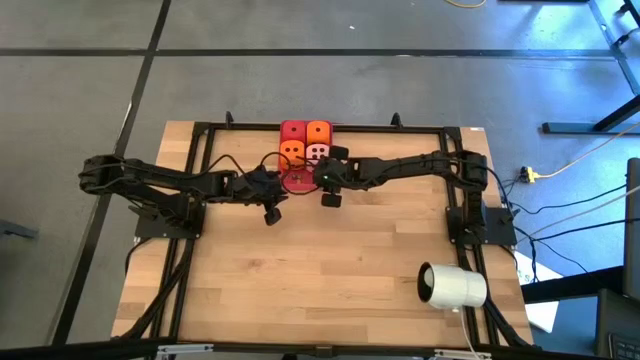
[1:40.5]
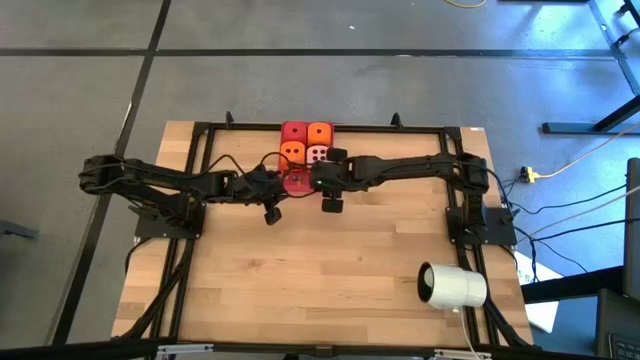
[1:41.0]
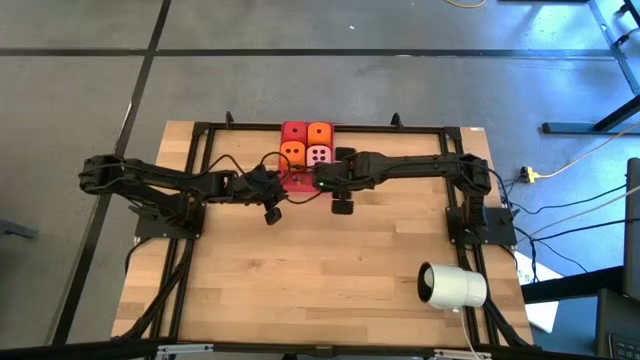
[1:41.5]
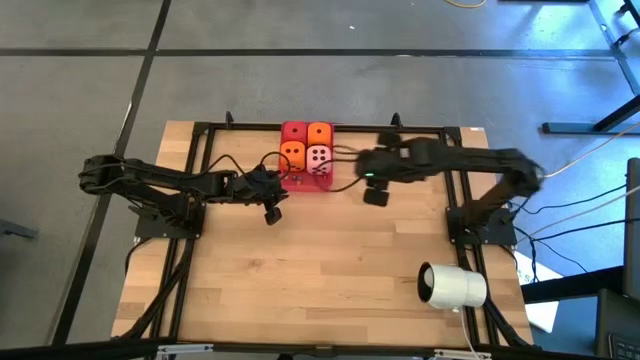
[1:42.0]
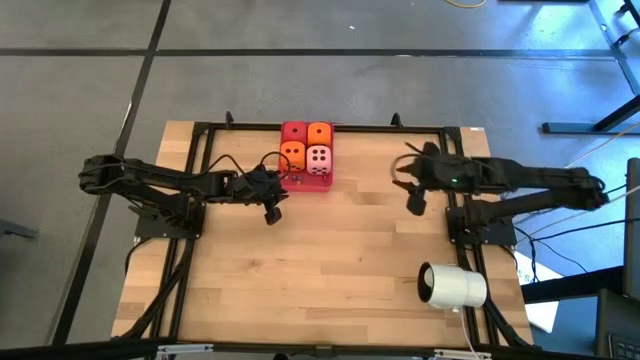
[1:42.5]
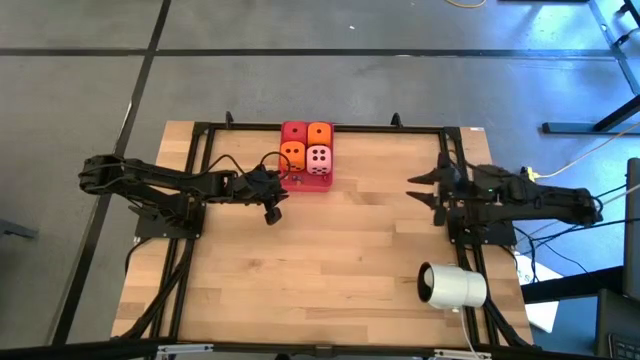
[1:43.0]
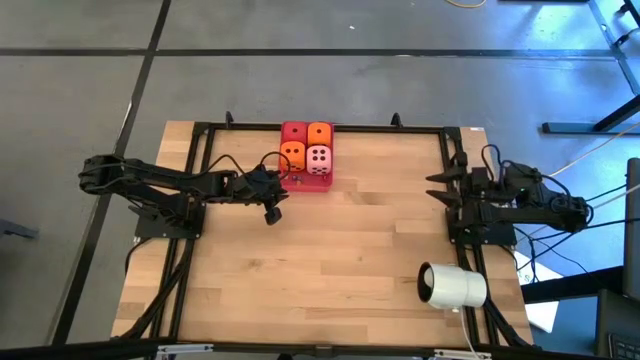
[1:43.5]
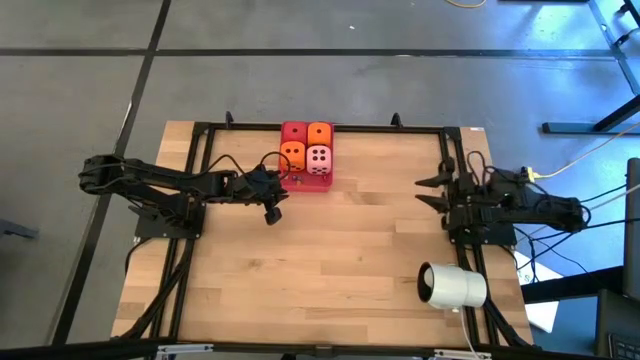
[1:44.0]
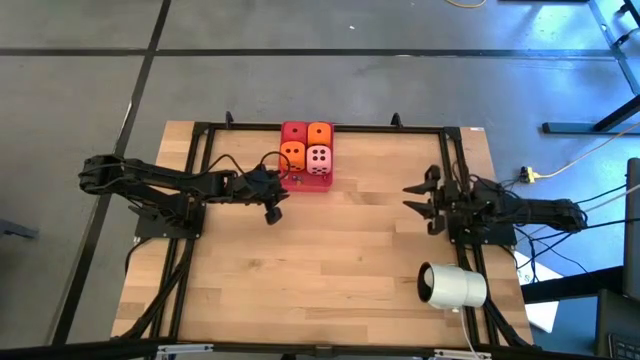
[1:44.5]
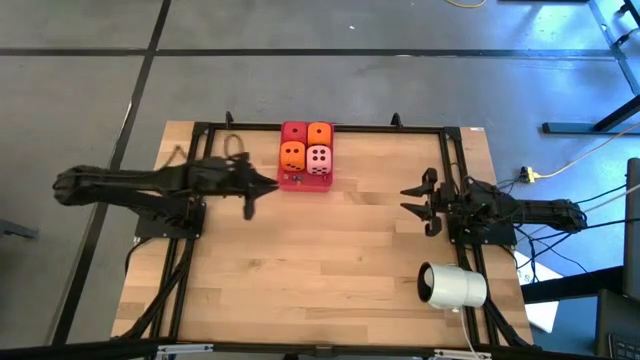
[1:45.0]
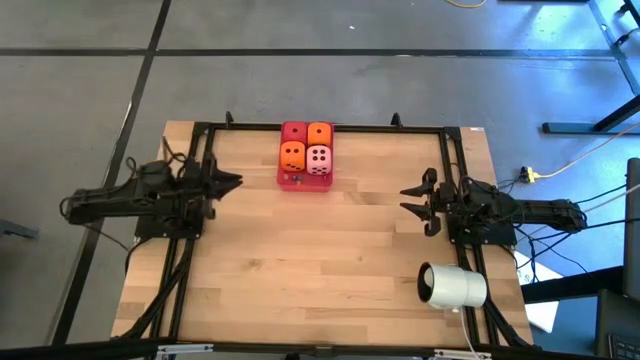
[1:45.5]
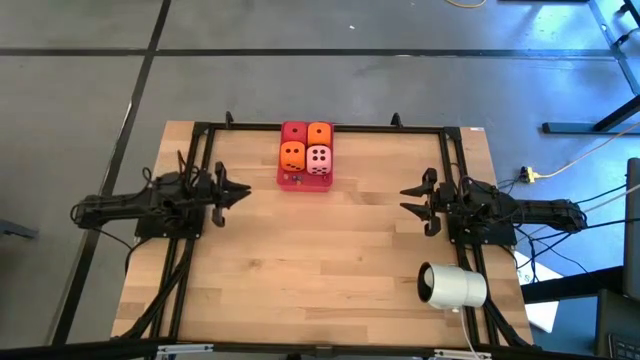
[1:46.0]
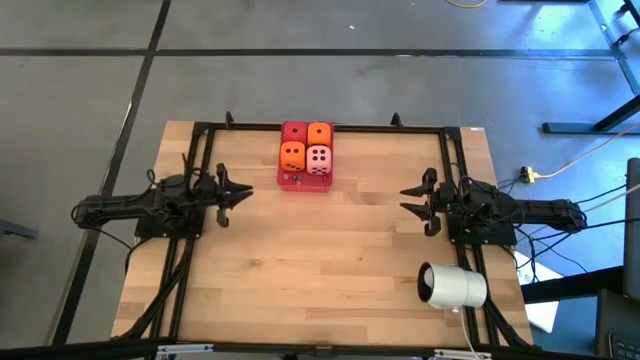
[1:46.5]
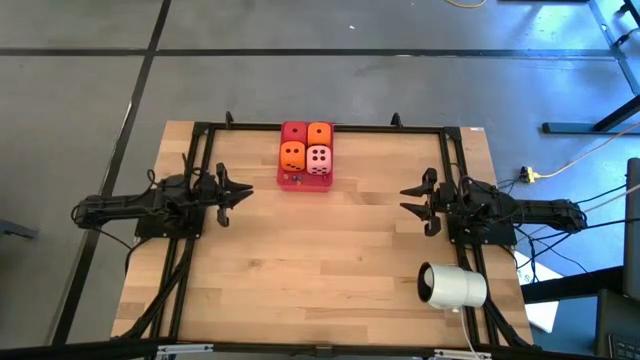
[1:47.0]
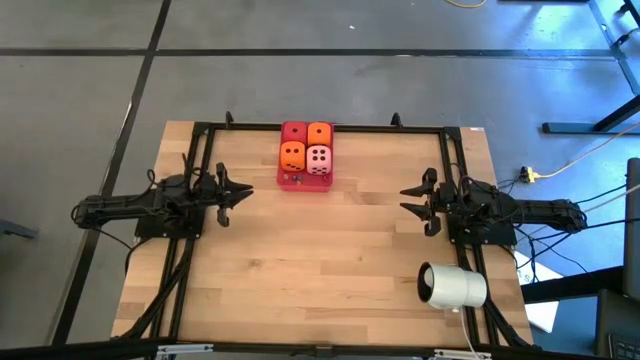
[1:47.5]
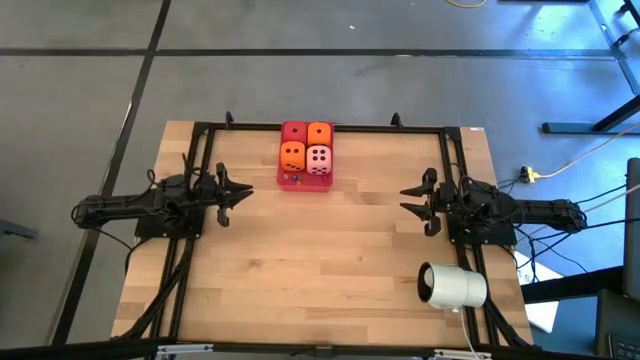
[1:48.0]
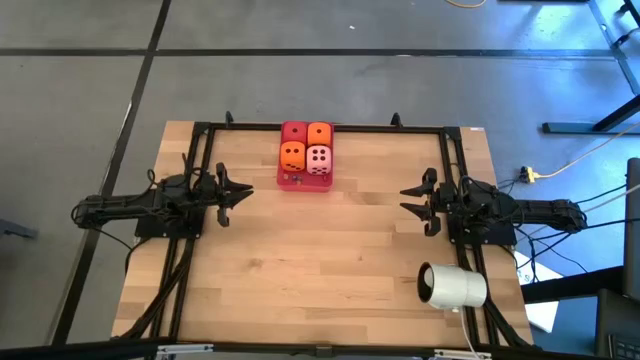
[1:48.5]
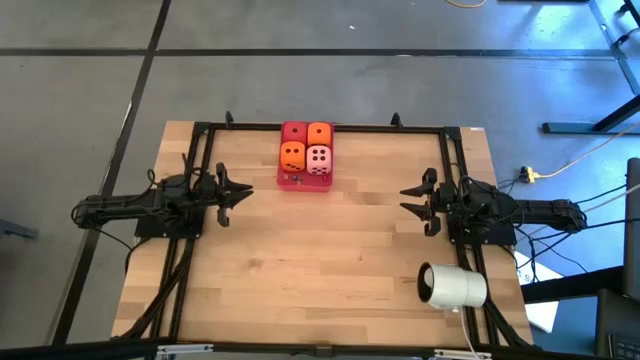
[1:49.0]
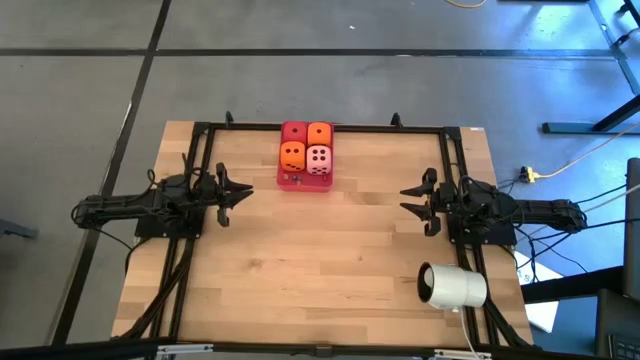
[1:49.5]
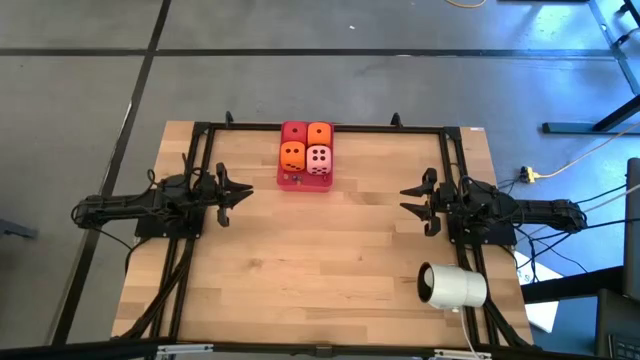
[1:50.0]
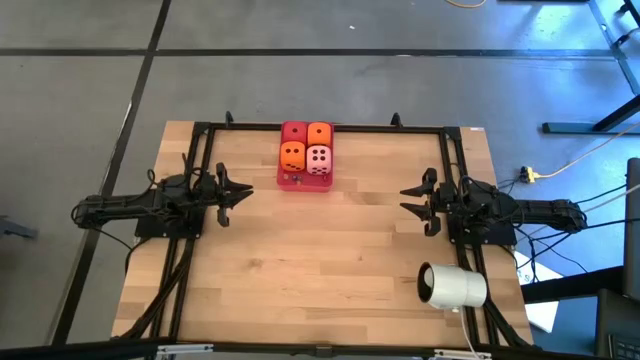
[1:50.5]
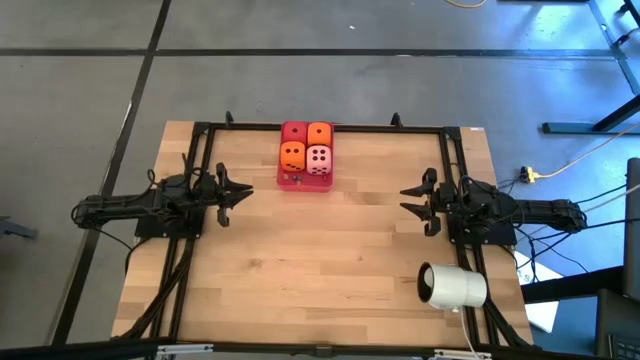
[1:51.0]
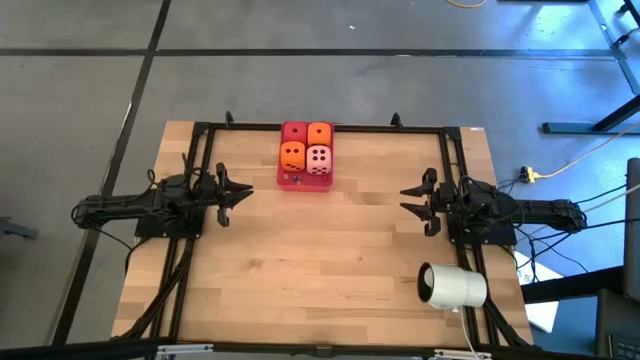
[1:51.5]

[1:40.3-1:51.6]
Task: Pick & Place Dice
Return to Home Position

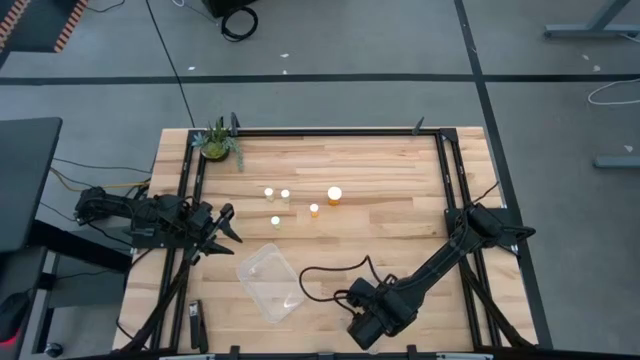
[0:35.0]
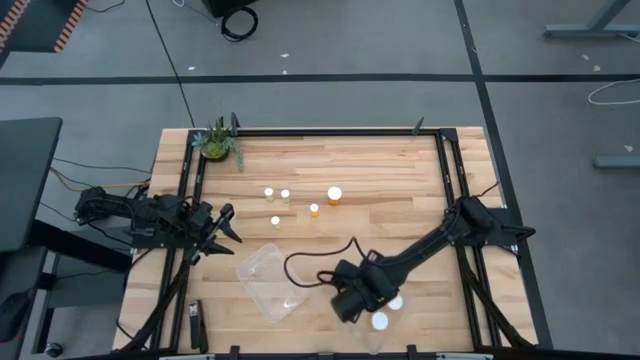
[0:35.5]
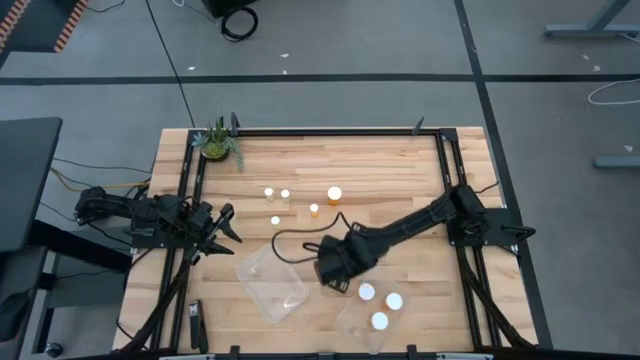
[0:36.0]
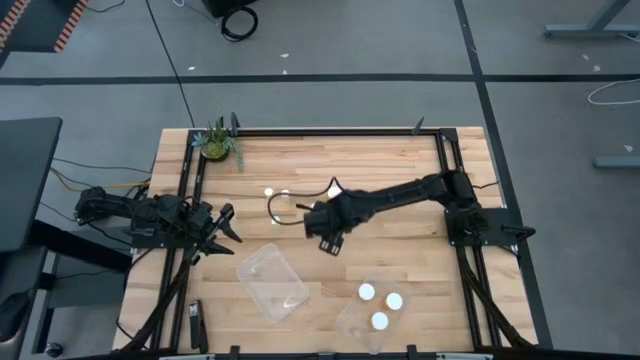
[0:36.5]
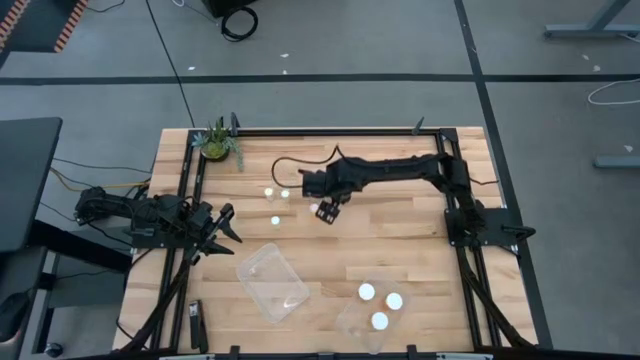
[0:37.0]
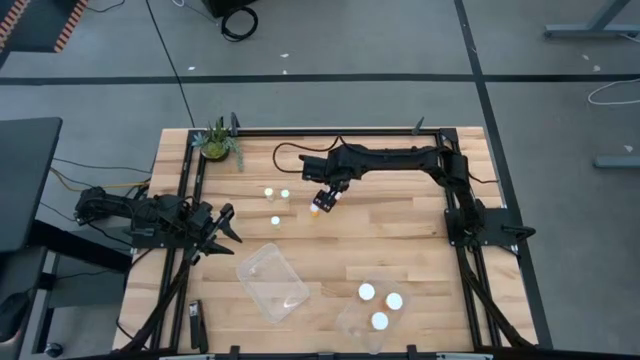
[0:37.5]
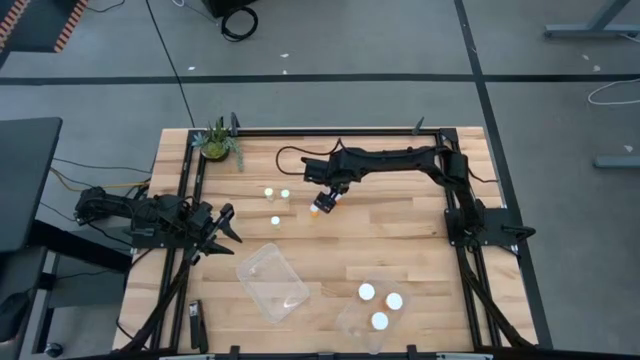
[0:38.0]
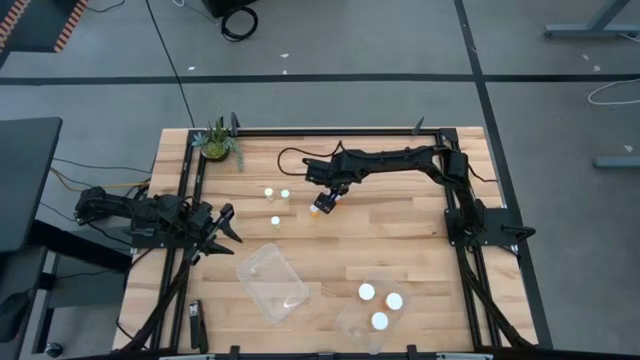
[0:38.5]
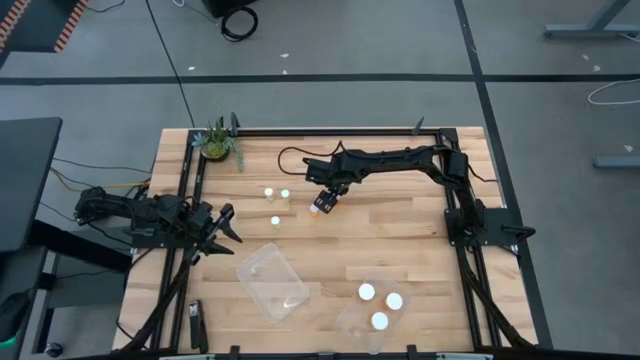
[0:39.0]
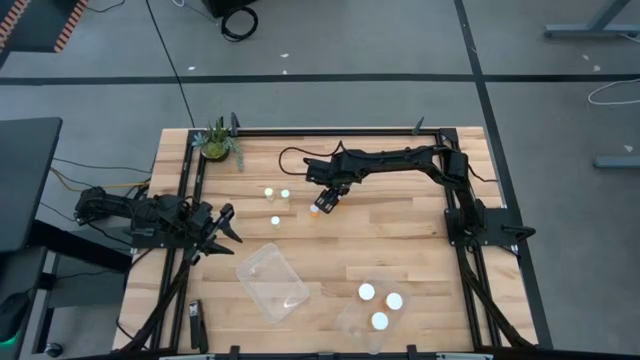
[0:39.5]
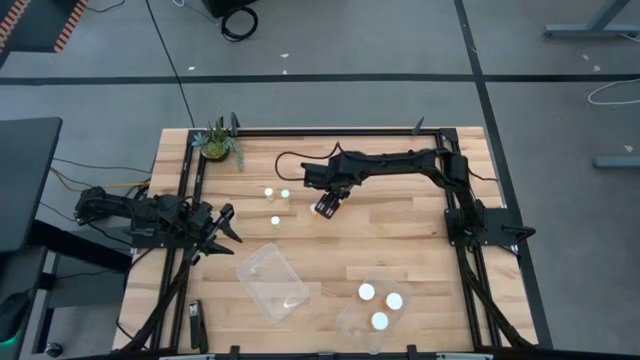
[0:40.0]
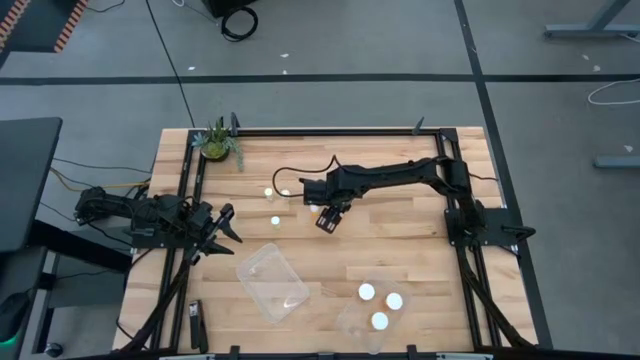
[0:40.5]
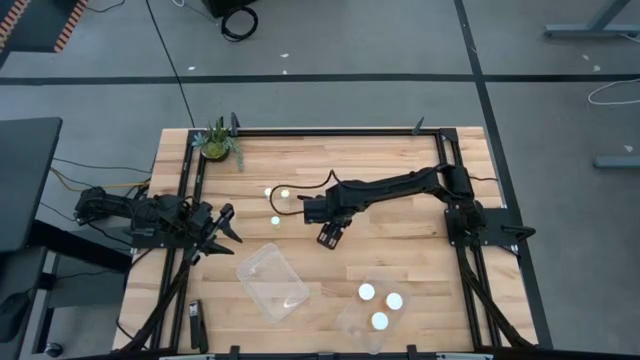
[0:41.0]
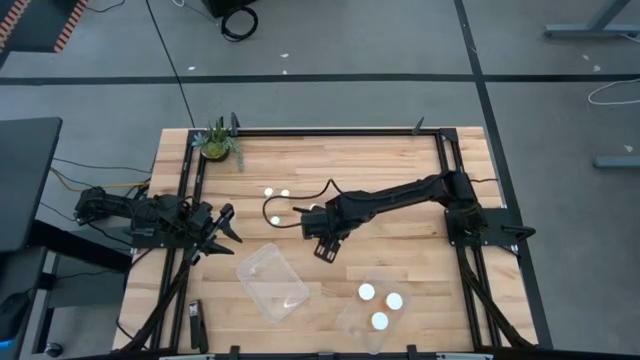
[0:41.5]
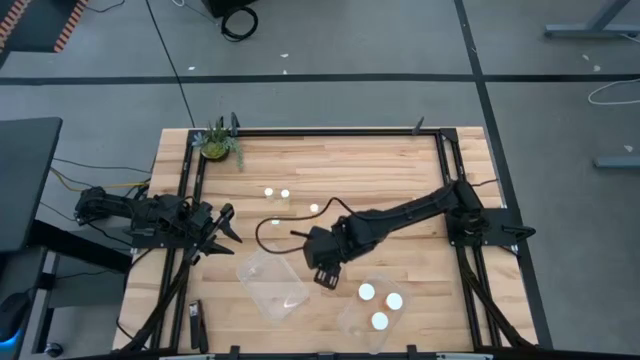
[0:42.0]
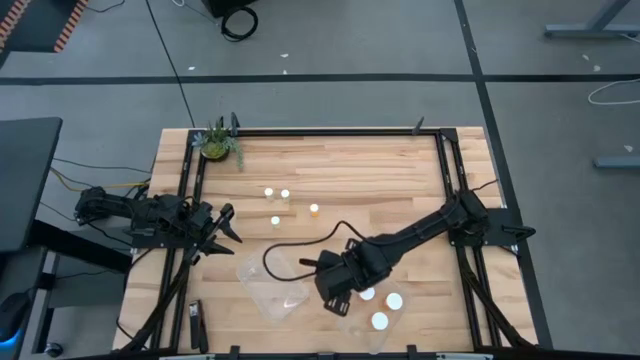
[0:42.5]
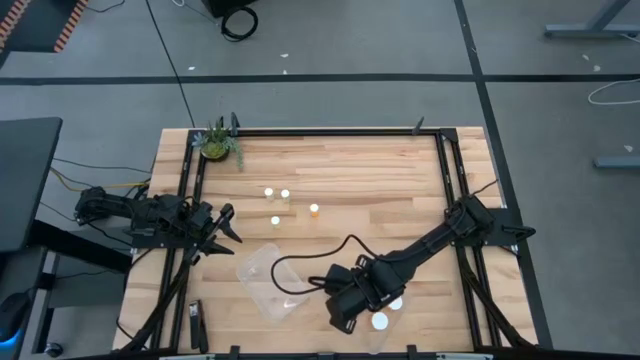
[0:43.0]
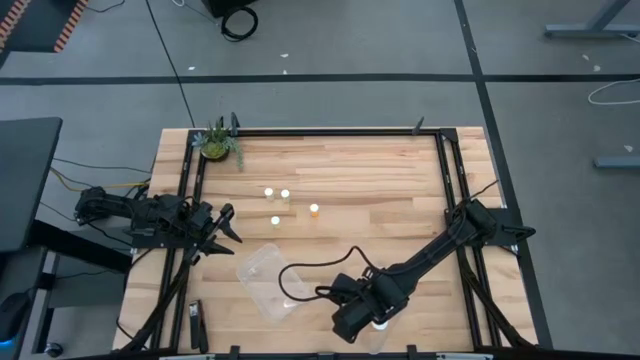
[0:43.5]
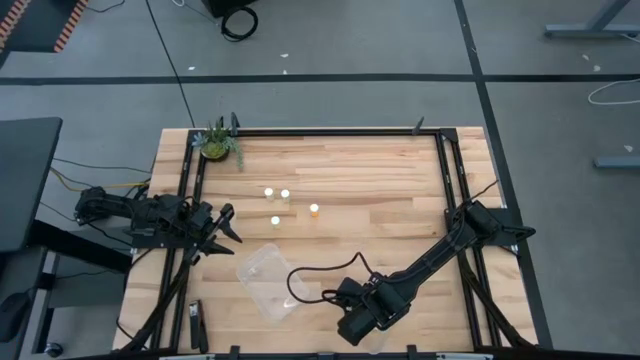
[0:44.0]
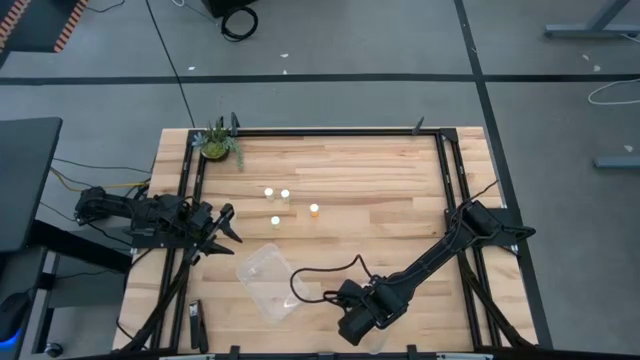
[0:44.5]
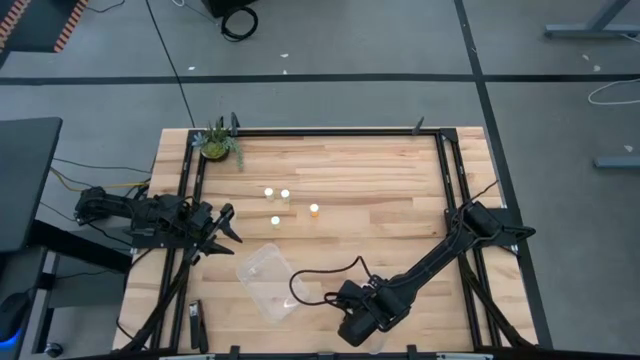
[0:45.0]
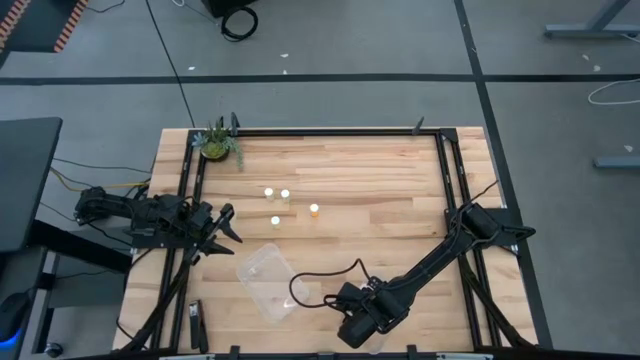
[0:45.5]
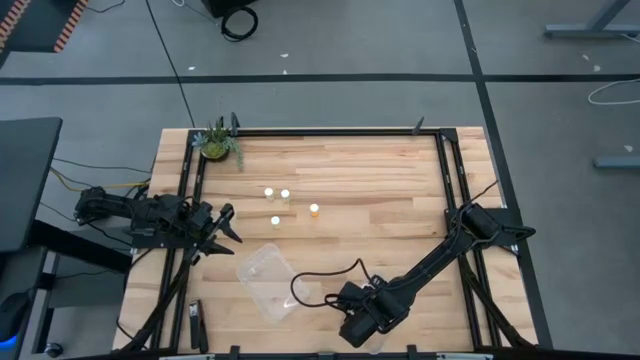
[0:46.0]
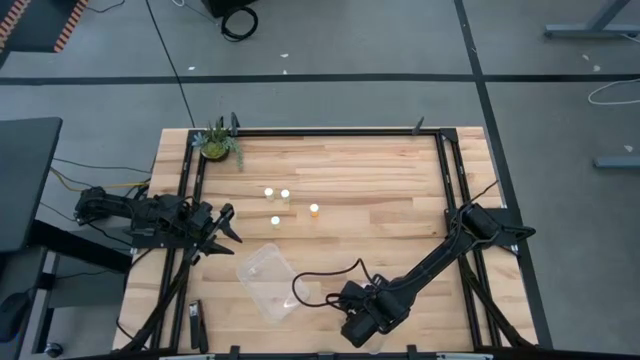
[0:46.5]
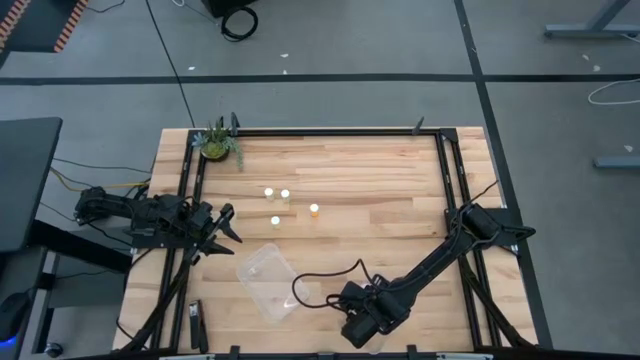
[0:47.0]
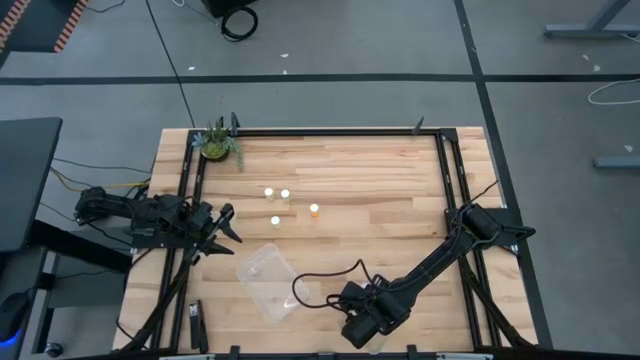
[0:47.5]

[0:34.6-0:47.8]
Task: Pick and place medicine bottles into bin by pill shape (circle, oval)
Put the large orange pill bottle into the right transparent bin
